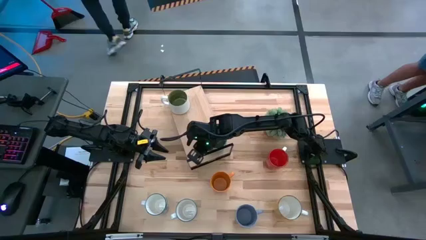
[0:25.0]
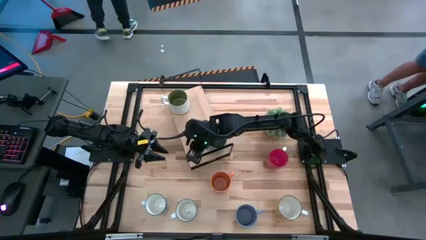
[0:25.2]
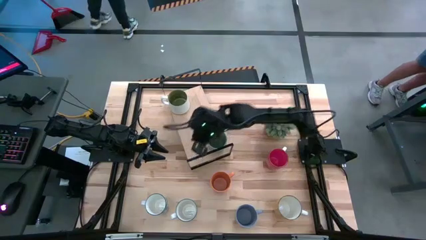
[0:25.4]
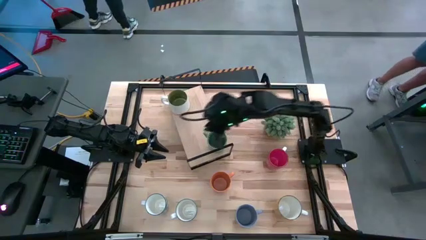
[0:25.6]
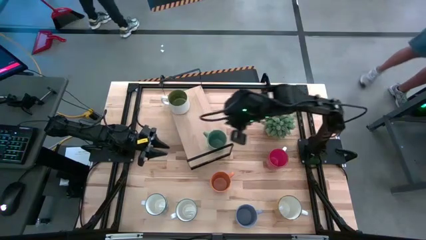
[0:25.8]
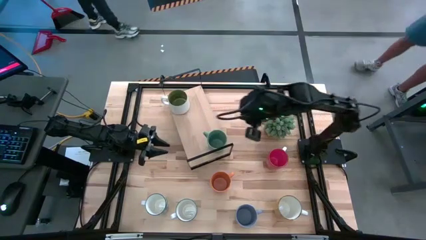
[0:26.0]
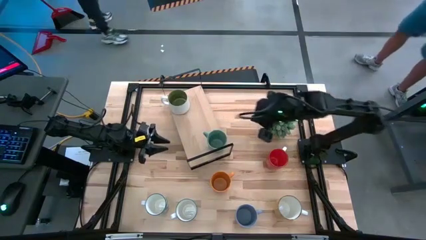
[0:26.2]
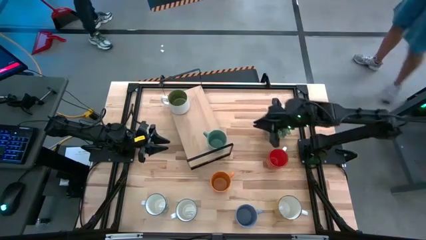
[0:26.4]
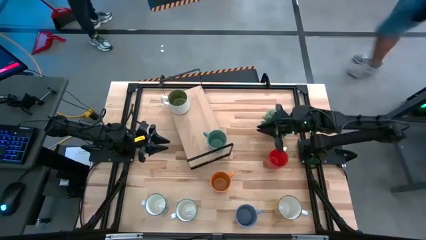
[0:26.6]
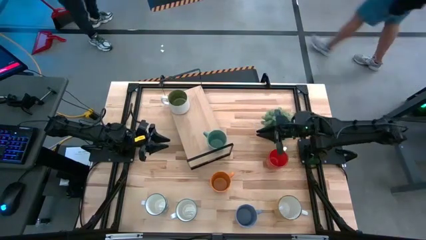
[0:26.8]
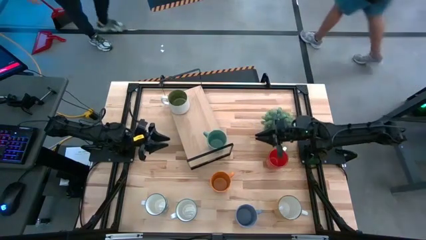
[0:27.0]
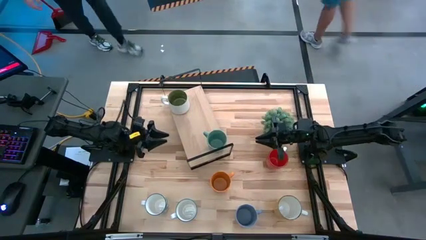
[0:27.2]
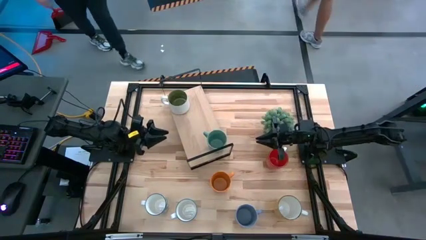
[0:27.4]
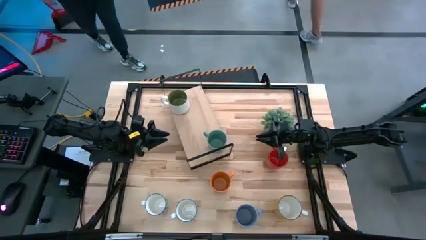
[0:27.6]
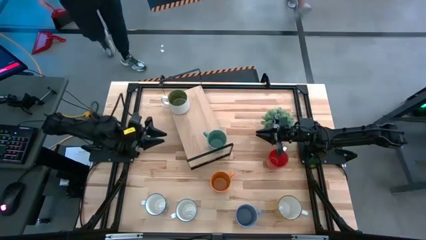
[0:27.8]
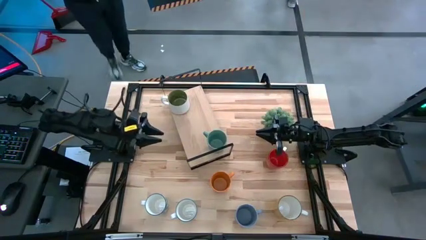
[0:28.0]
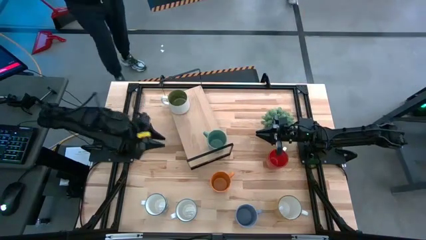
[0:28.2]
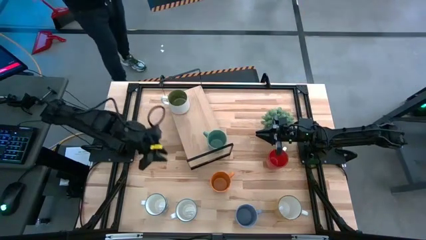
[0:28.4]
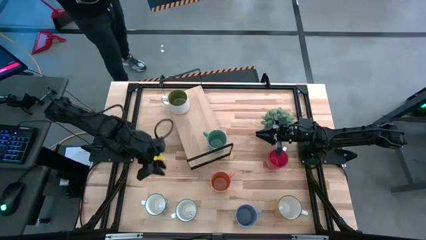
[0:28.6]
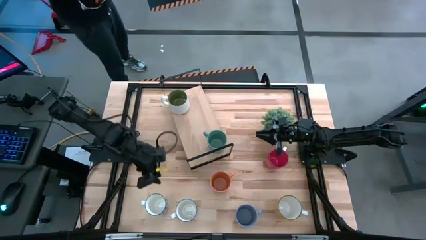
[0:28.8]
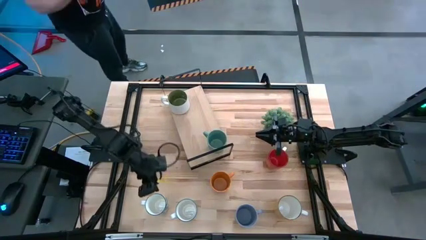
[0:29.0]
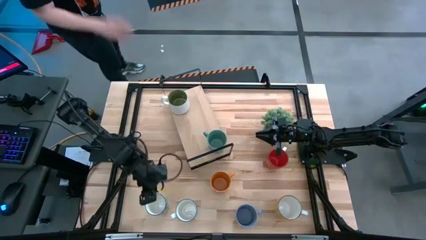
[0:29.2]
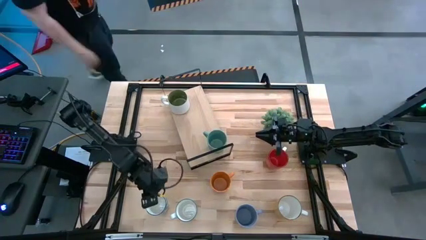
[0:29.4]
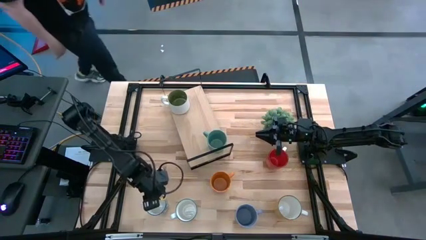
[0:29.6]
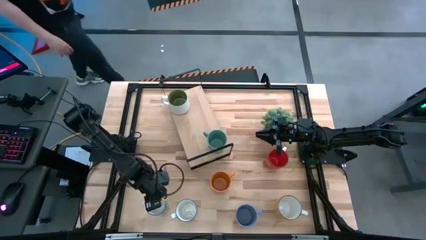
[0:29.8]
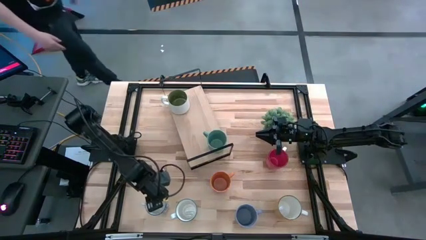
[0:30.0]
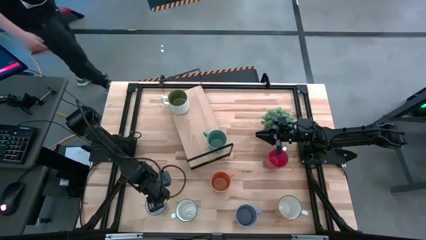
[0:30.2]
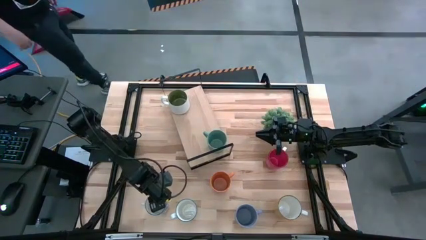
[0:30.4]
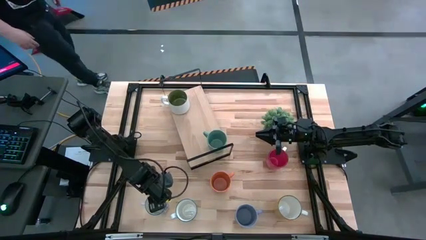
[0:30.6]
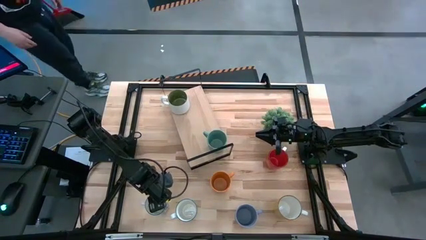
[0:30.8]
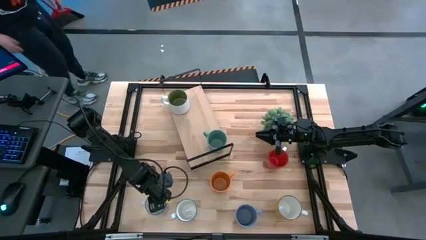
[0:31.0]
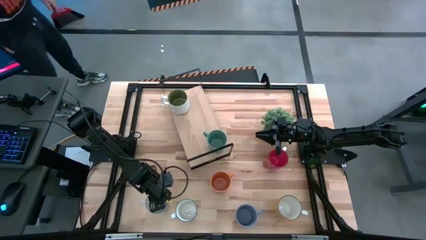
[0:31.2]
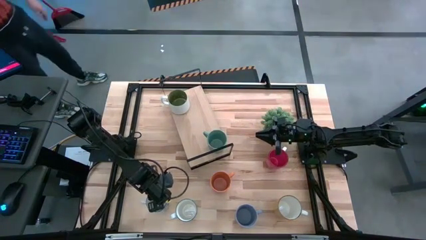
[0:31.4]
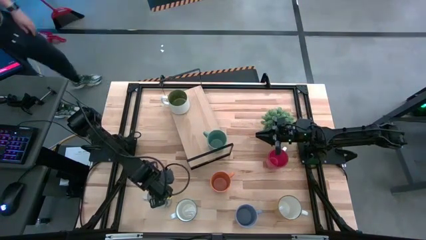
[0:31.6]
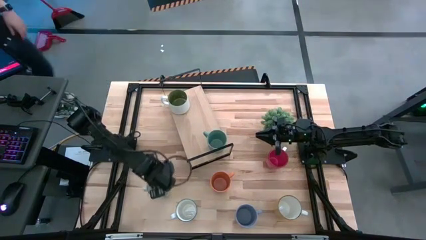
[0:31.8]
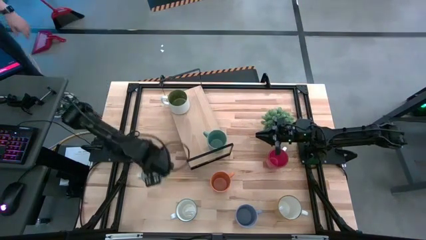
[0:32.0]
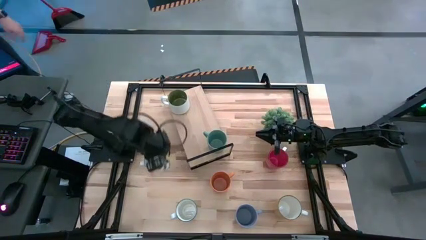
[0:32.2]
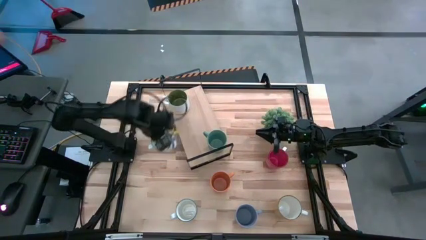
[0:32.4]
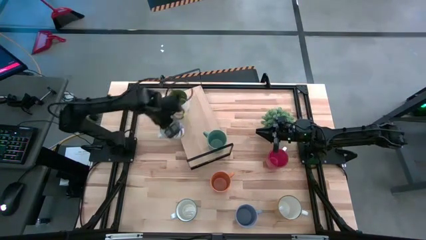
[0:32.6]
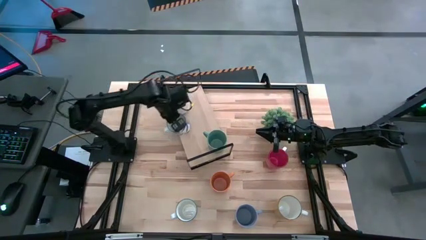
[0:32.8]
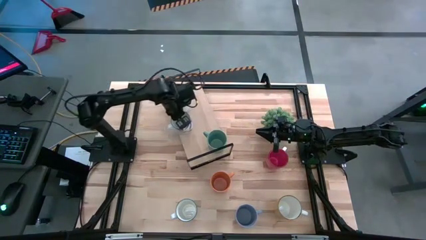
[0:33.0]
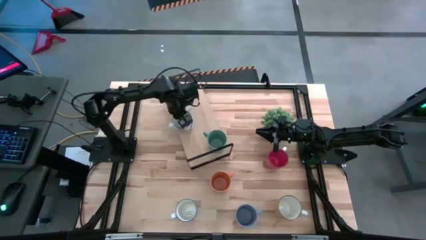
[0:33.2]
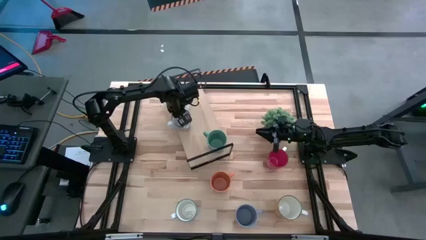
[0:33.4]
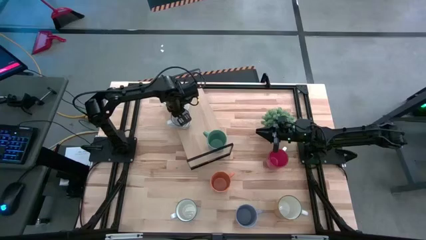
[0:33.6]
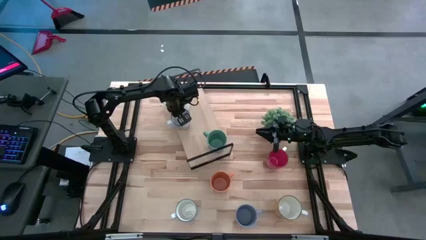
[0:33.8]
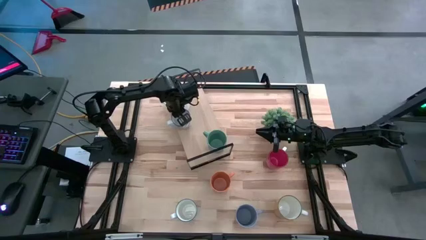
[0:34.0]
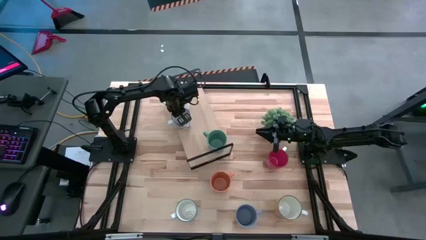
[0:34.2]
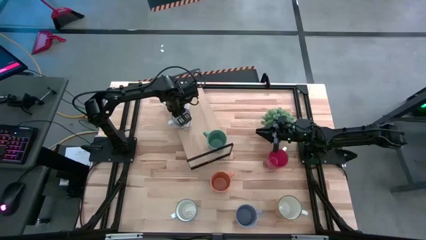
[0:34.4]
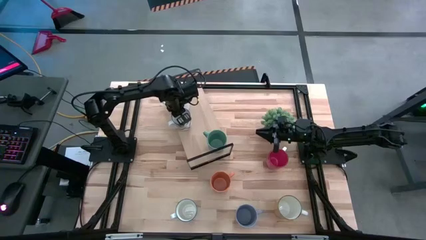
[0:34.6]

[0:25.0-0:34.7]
Task: Place coffee mugs
Put the left blue mug on the shelf
